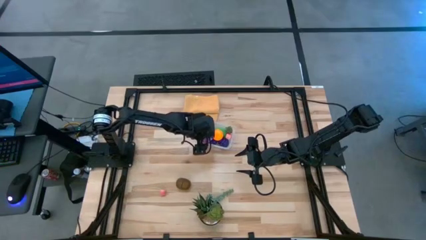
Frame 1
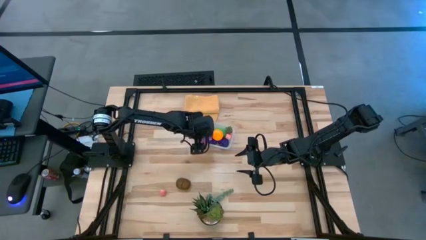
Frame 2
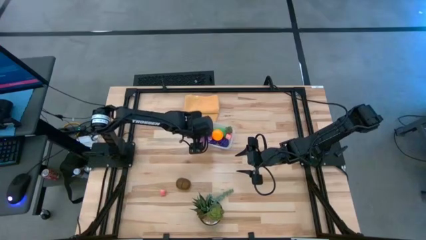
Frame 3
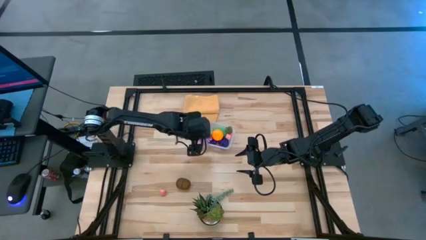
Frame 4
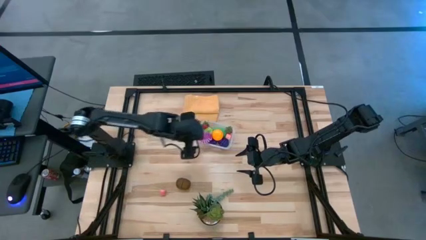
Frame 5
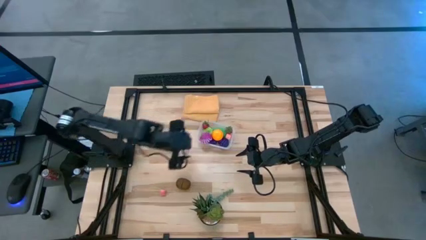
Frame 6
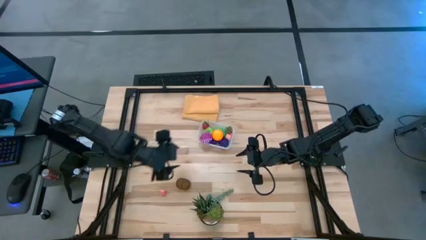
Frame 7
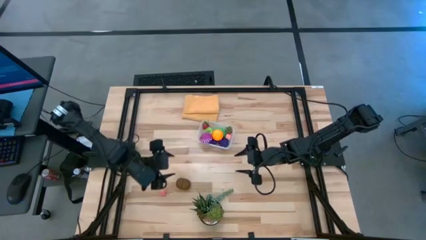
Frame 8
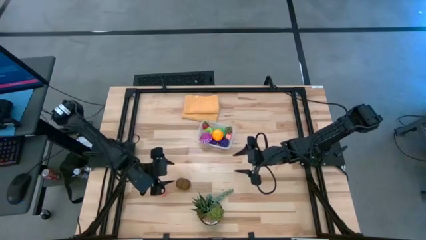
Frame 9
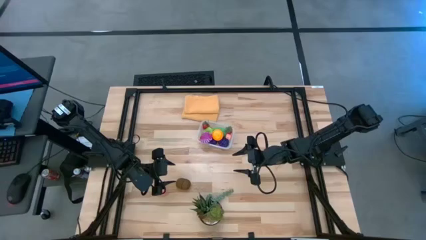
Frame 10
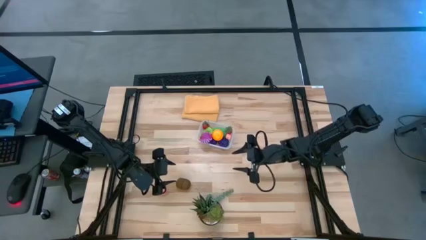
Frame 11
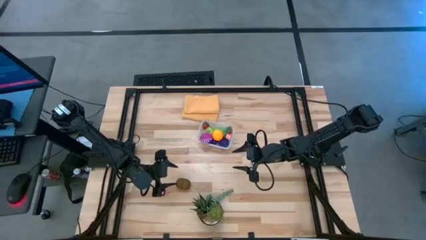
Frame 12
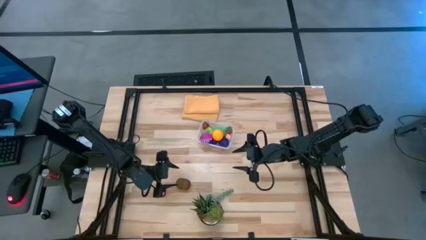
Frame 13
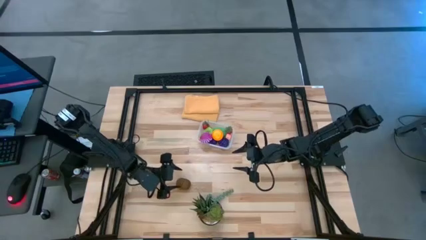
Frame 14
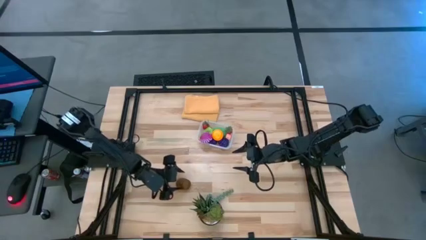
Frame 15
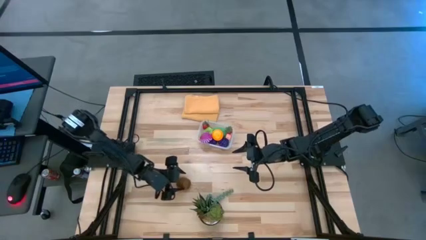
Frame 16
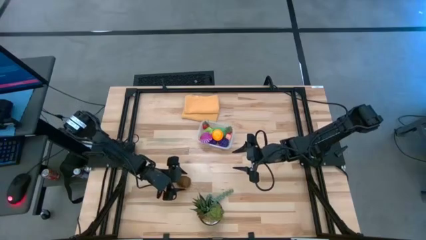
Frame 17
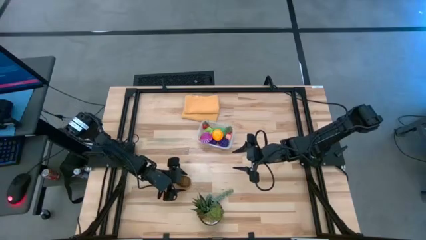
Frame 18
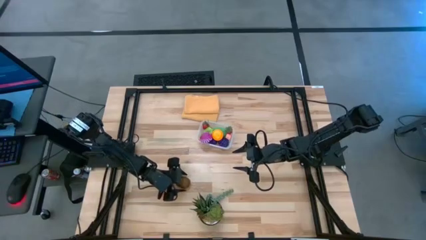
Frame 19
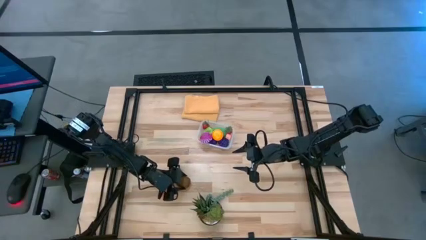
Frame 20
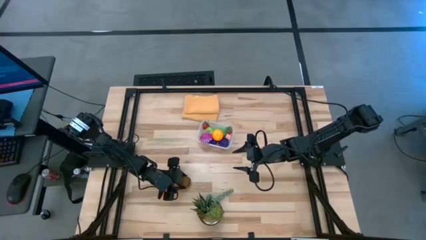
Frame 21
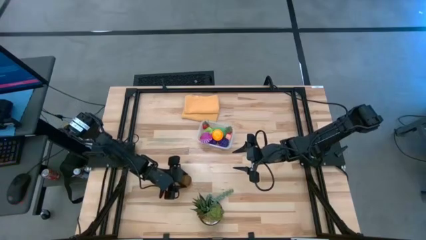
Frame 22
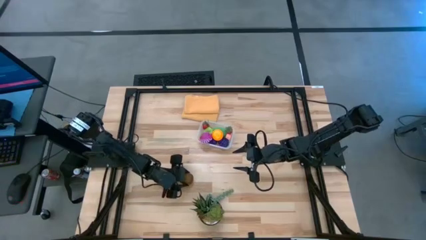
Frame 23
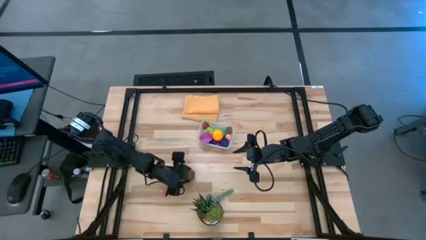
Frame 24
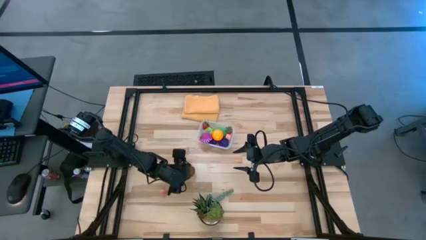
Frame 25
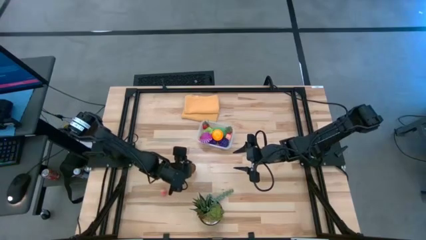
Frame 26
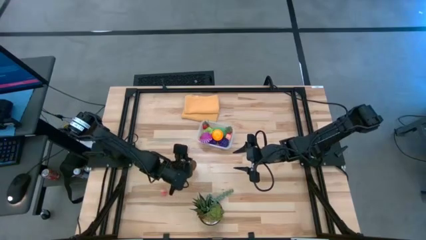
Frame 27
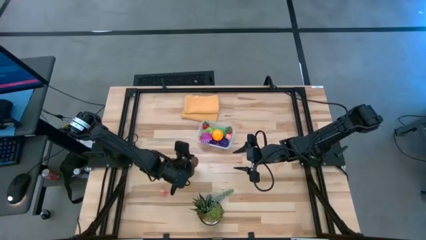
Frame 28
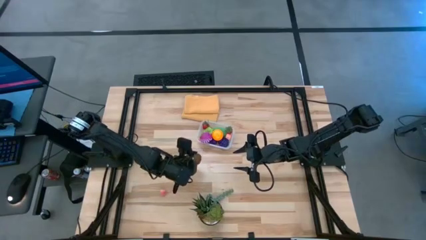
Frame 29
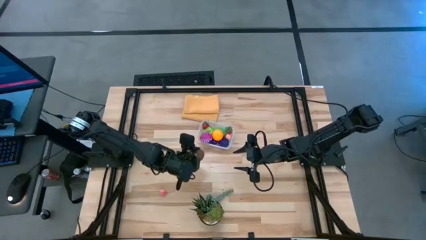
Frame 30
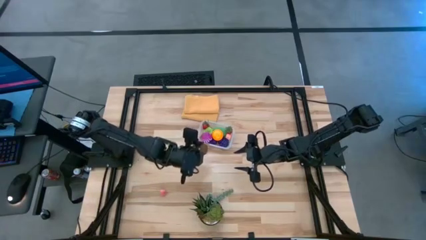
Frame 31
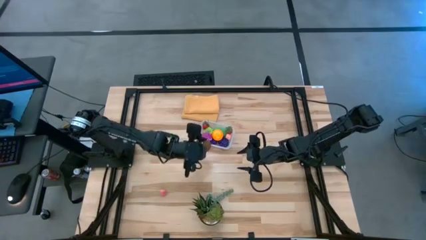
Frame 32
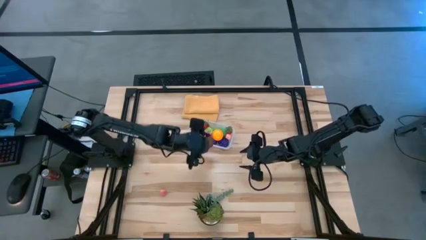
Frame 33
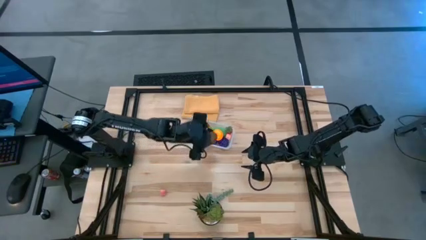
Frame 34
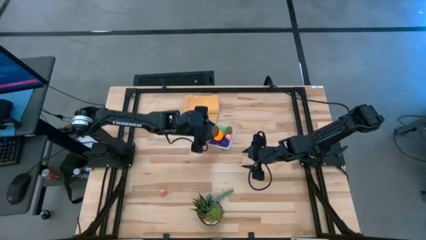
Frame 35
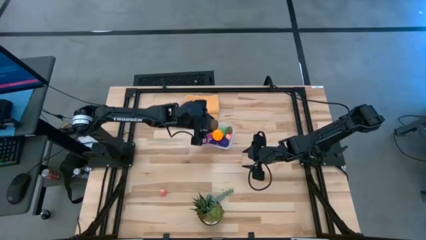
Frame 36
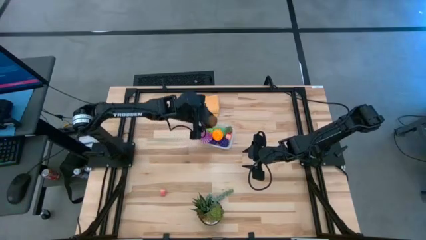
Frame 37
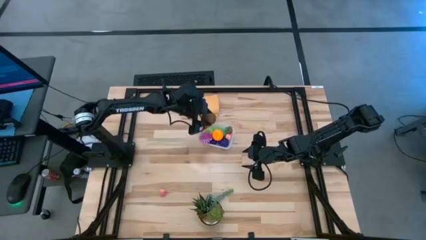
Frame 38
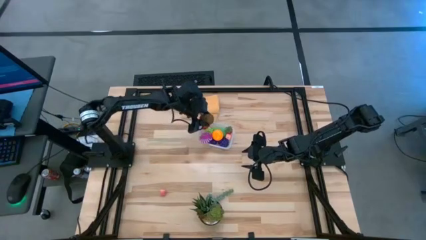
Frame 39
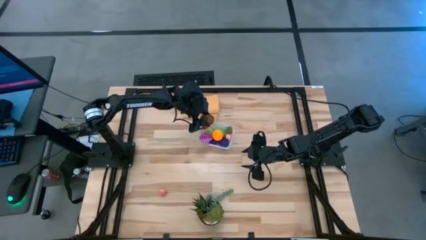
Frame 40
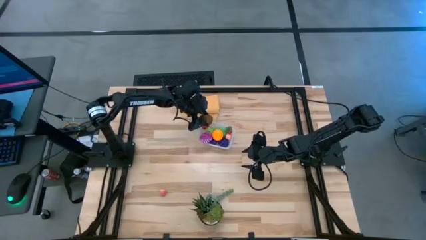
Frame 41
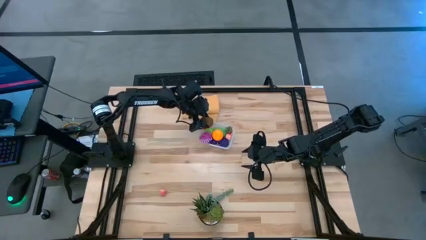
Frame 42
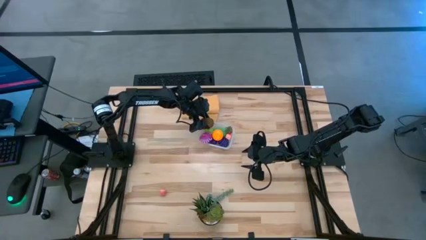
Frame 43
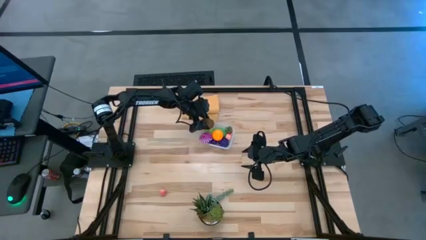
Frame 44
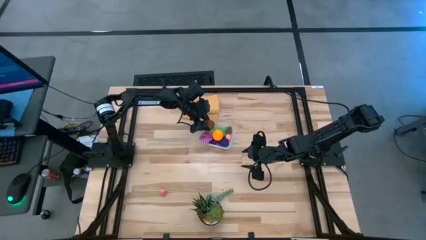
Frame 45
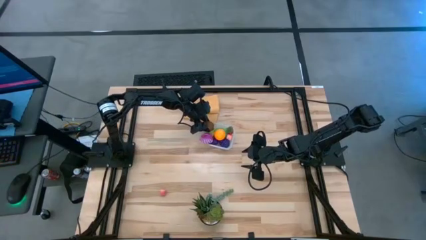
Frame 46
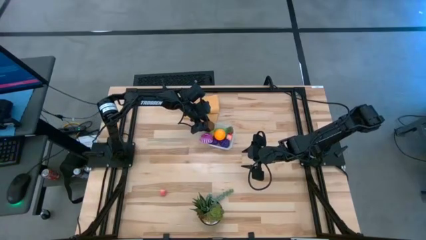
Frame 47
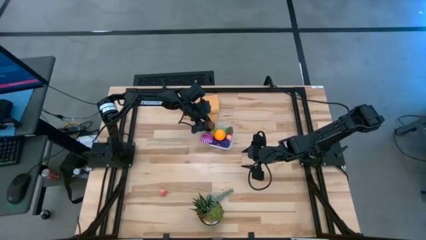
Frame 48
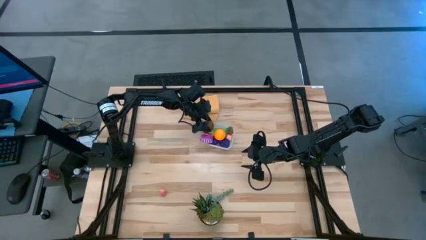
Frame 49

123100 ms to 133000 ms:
Task: Pick and placing Produce into tupperware
Put the brown kiwi into the transparent container

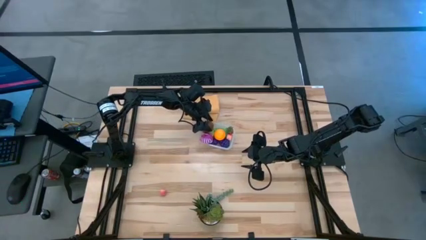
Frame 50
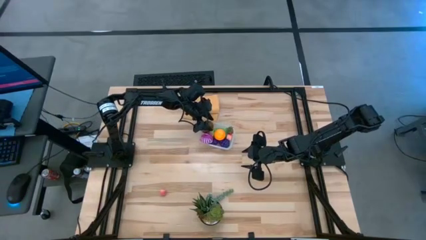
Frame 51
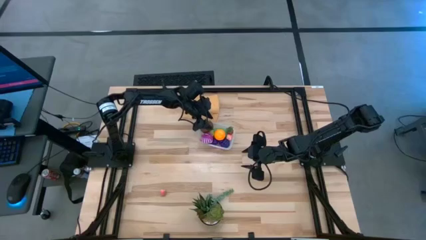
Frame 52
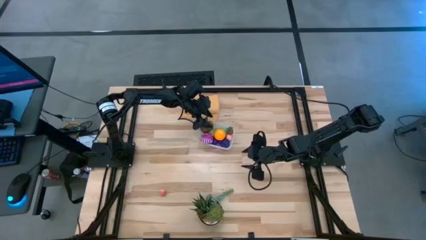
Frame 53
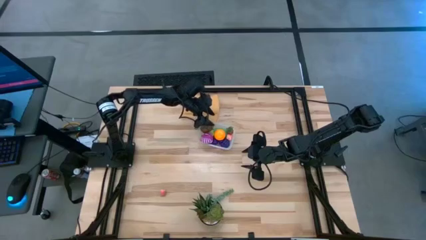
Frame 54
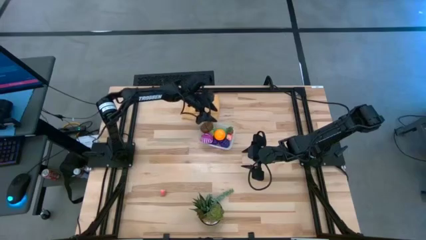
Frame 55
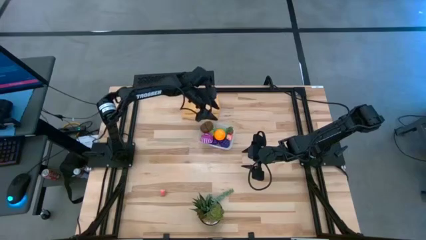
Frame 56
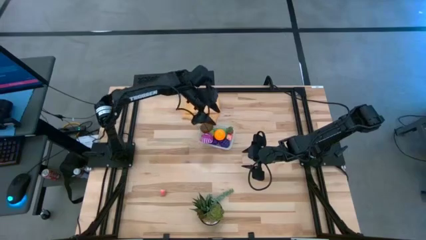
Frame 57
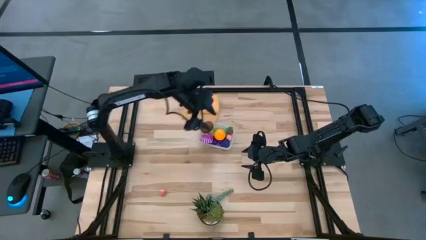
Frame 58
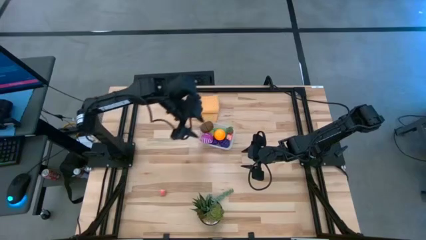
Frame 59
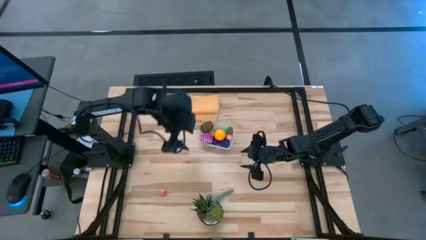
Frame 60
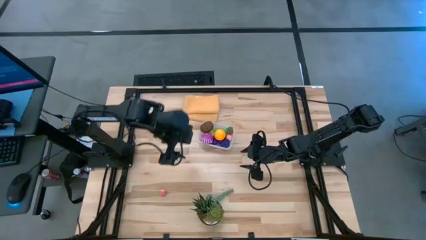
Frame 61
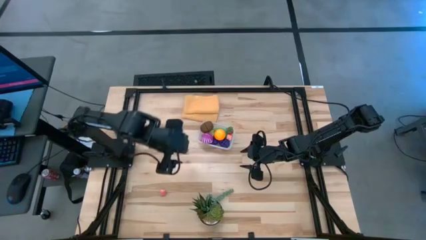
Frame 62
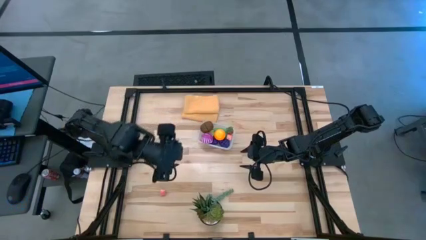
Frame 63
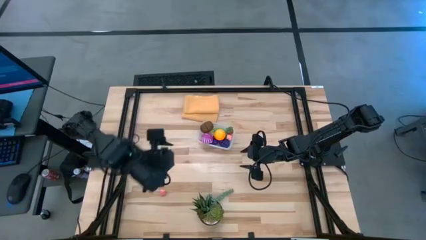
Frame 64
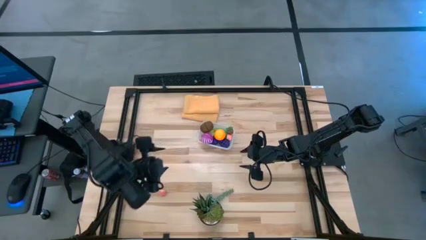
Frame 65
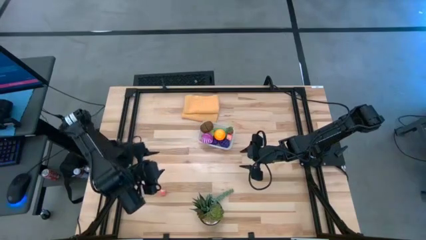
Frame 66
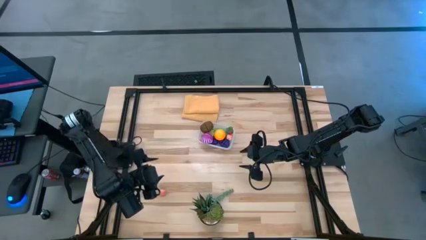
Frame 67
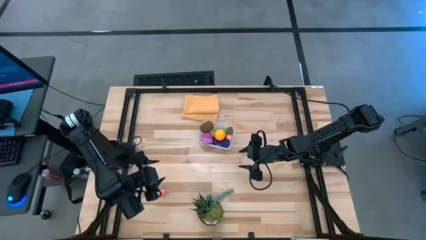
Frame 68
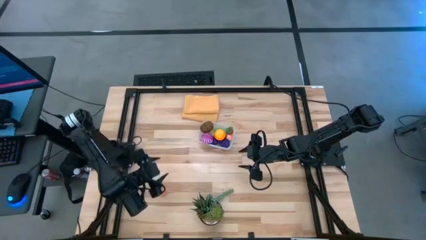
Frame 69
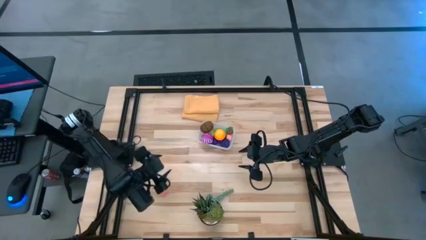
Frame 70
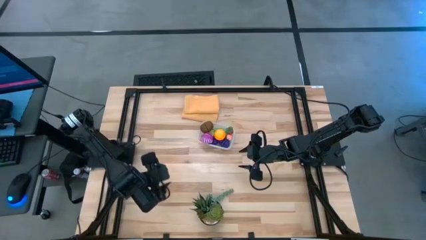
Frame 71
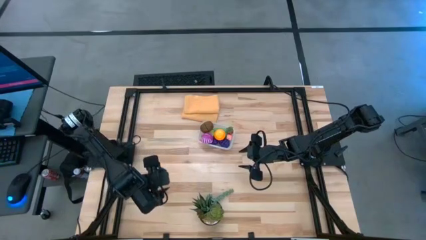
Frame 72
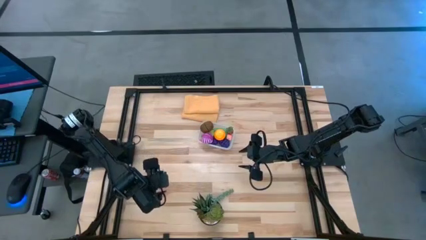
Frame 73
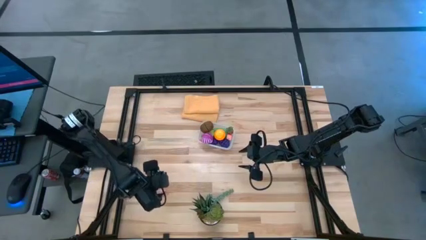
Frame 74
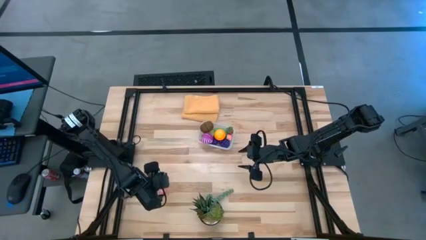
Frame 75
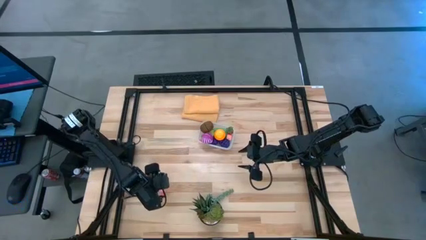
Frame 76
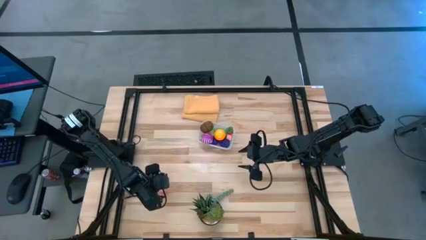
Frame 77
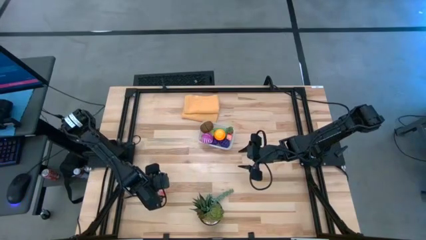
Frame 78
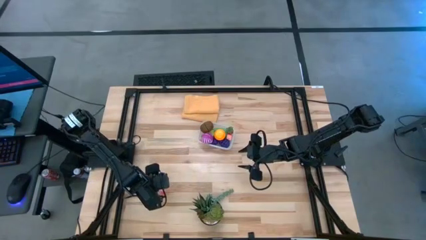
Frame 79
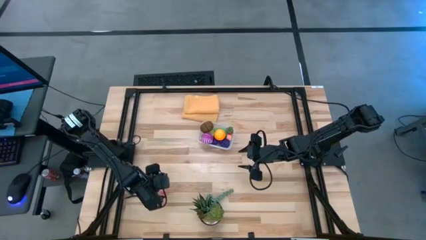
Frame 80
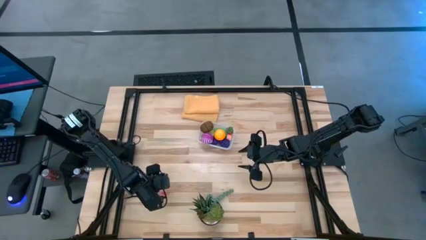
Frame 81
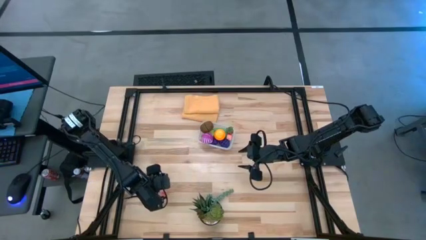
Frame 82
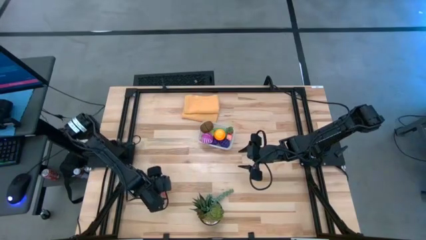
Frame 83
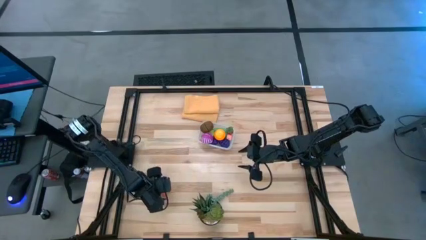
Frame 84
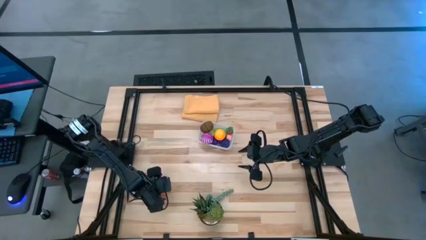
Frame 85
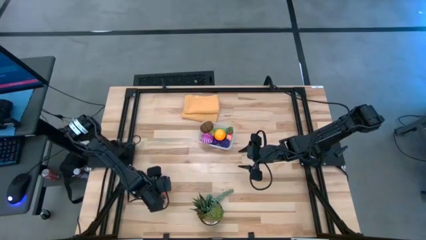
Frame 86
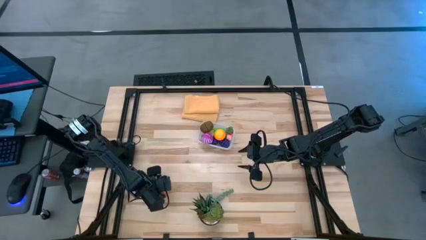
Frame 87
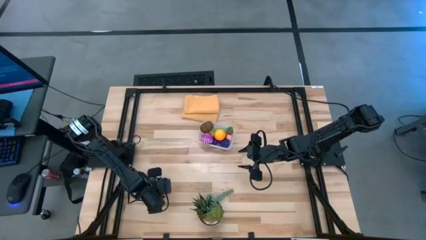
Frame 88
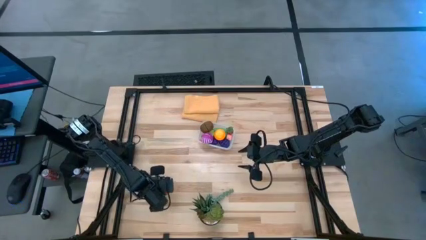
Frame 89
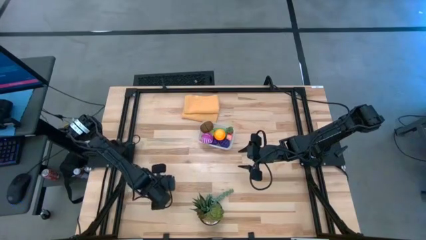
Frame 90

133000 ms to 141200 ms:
Put the pink peach into the transparent container
